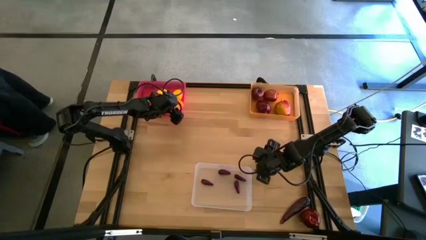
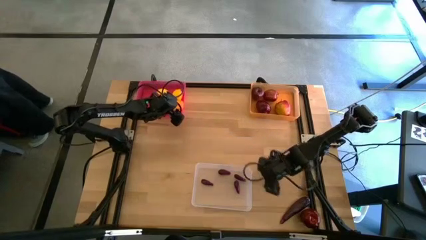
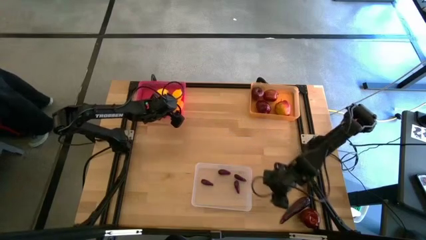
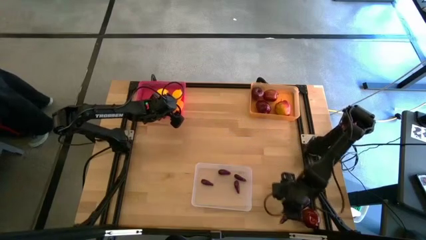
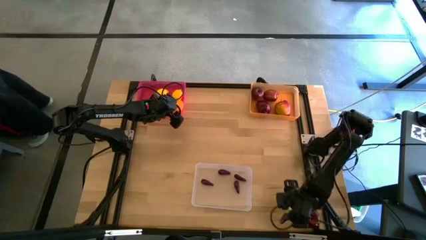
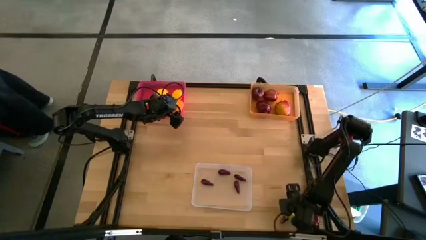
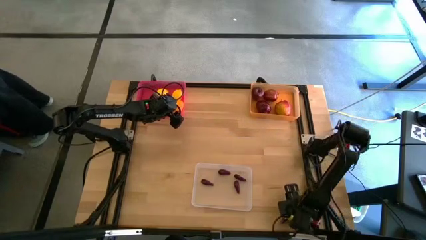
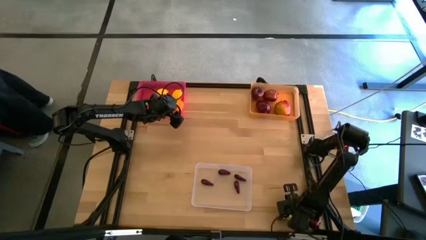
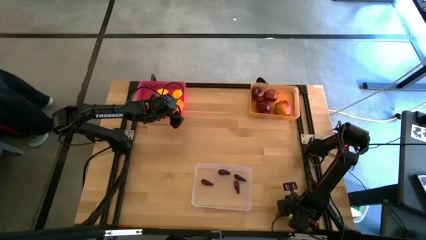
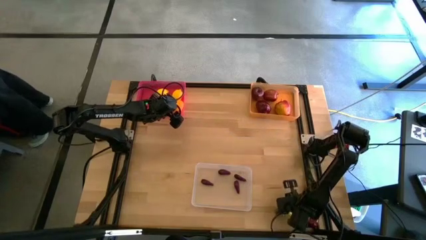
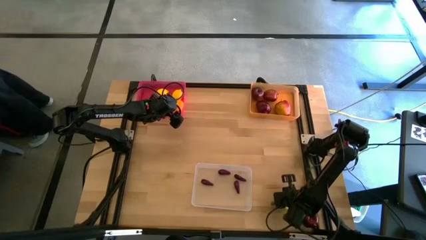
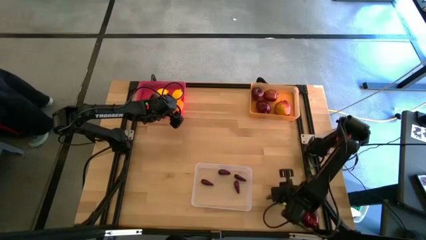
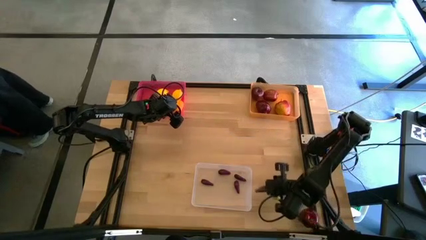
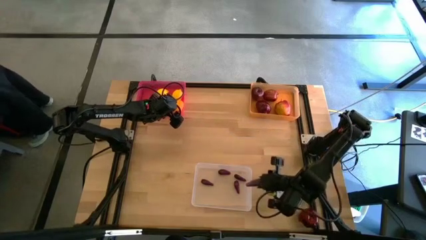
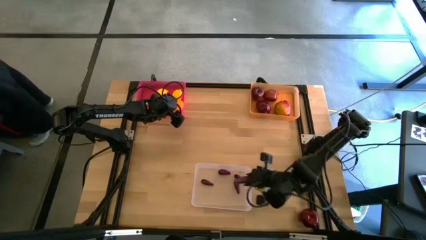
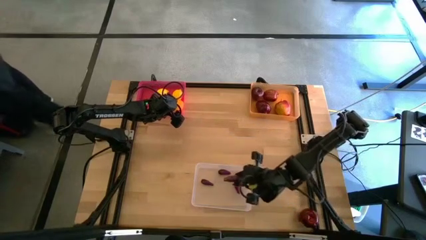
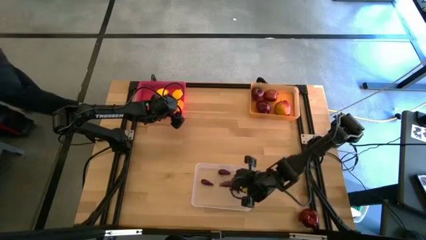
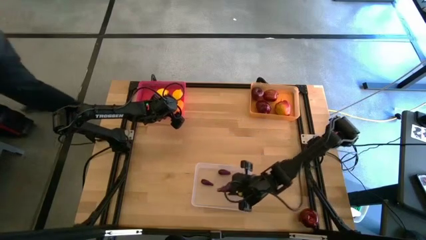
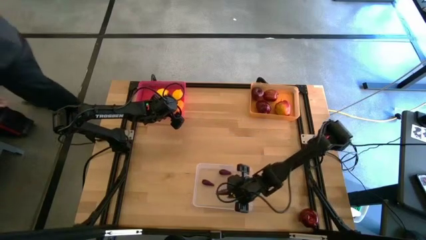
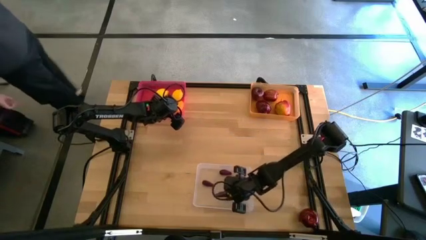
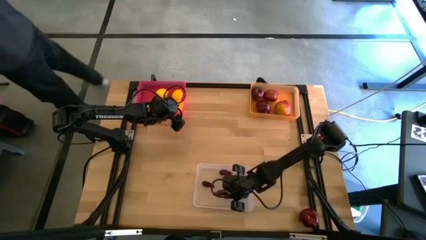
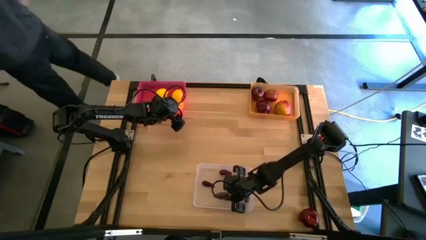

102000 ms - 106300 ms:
Task: Sort produce into baskets
Put the eggplant into the transparent bin

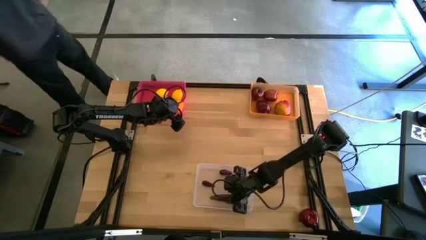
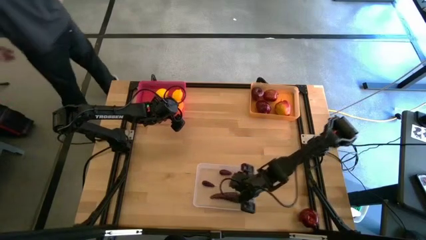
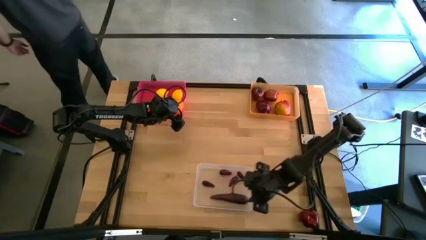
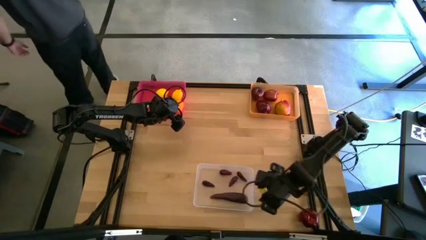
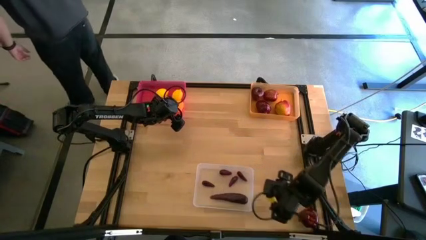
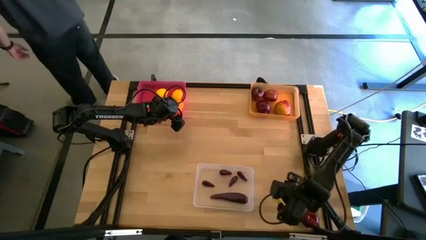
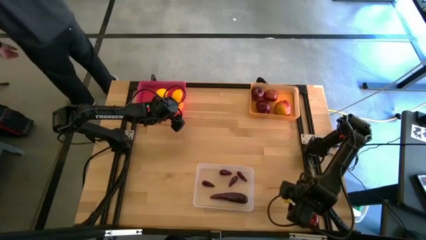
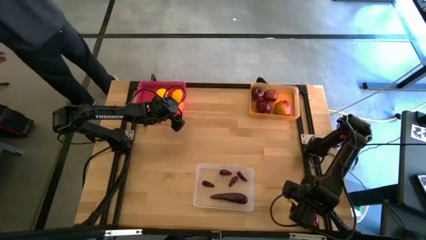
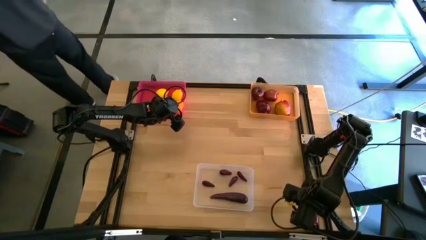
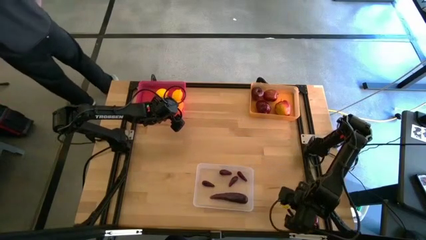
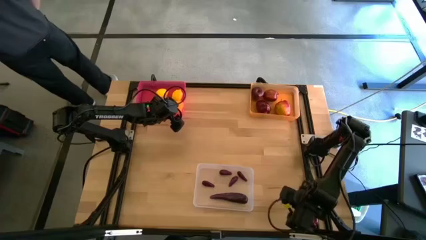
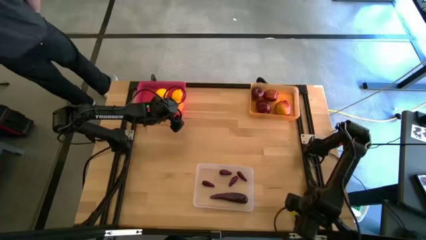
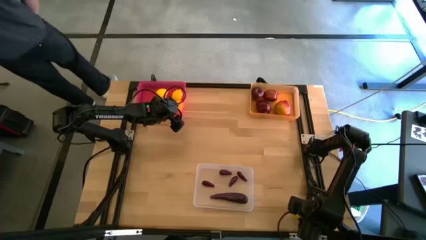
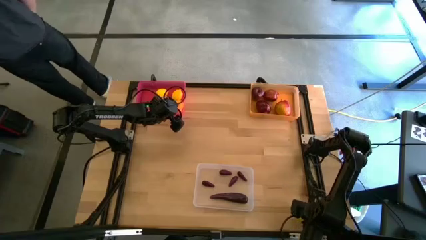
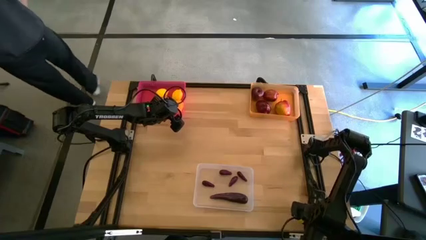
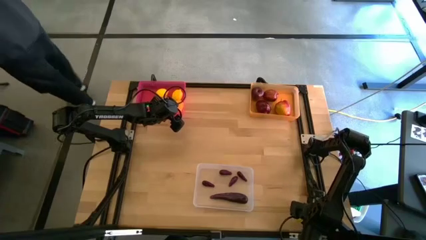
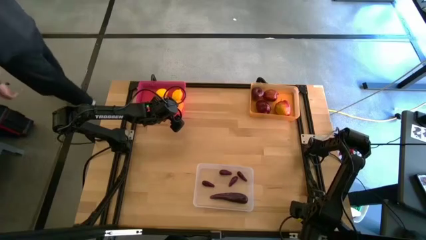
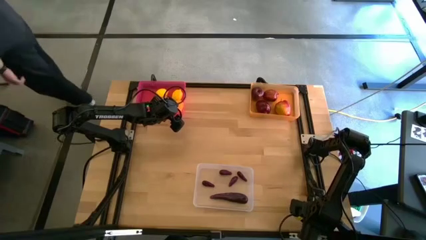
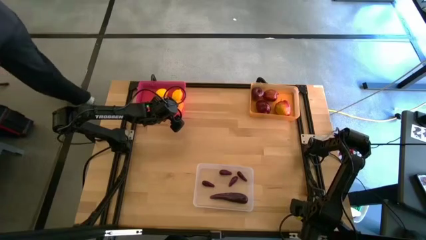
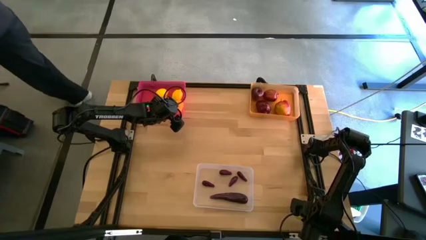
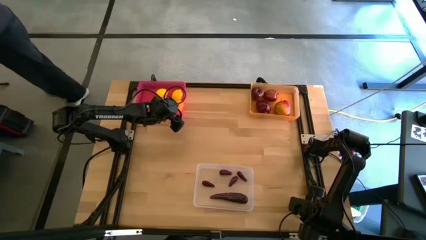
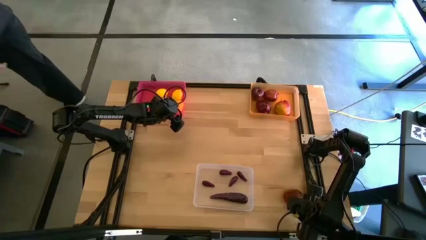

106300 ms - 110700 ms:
Put the apple into the orange bin

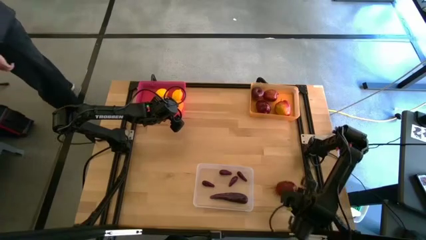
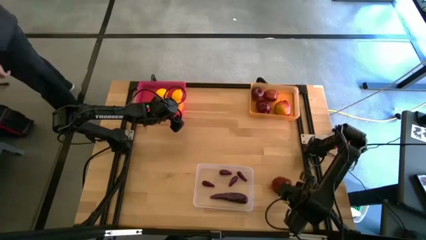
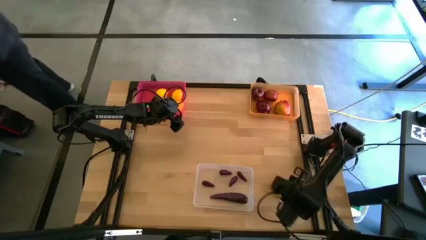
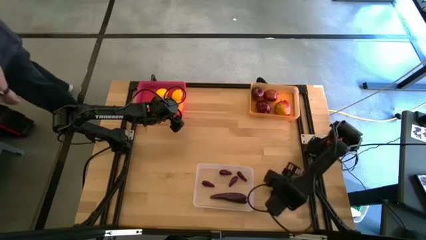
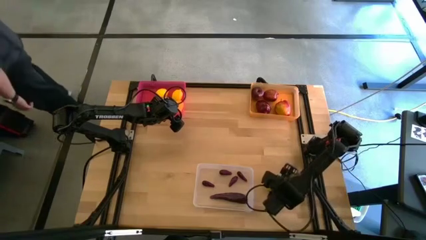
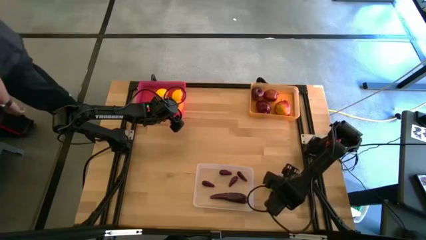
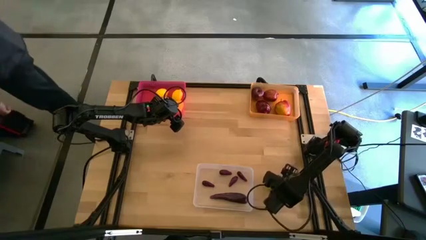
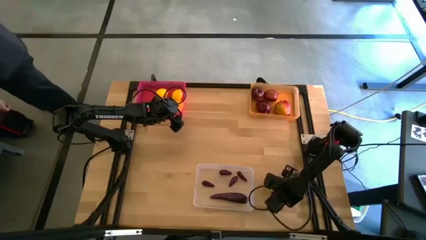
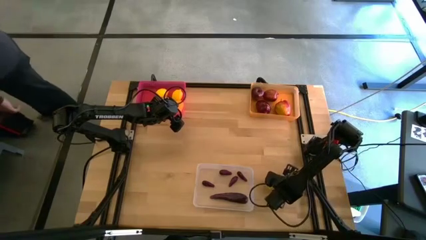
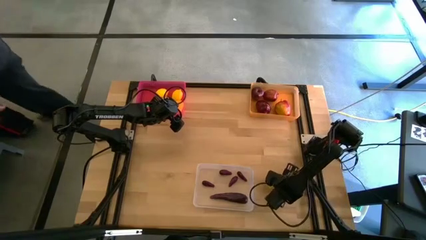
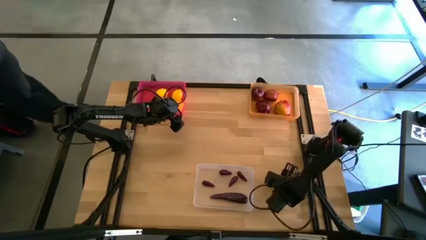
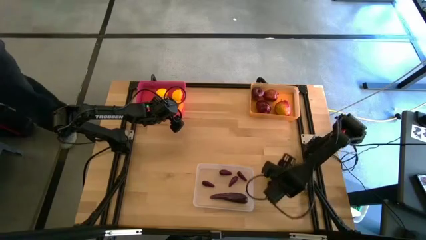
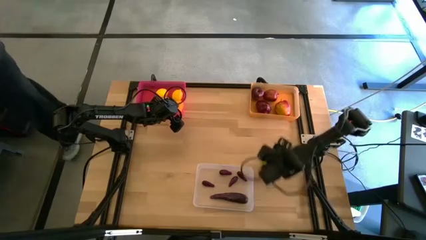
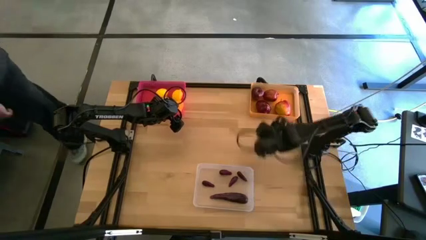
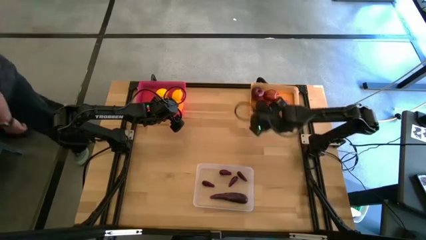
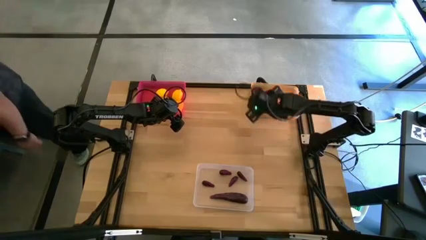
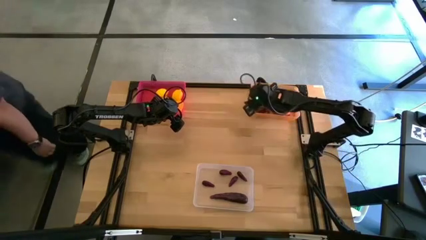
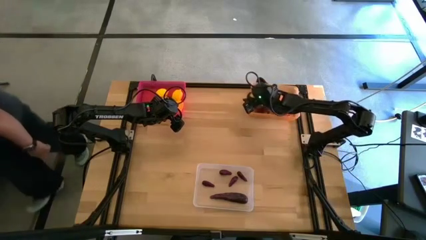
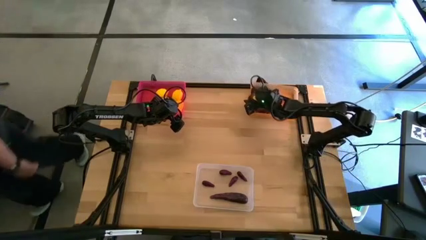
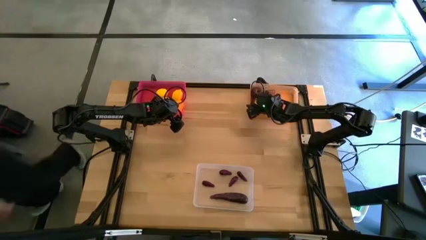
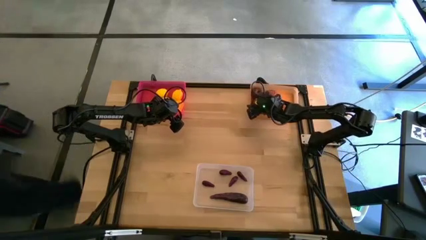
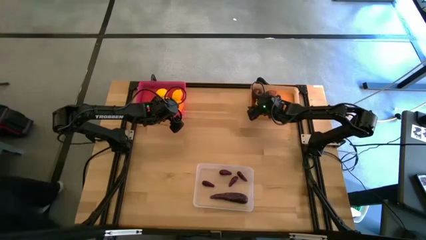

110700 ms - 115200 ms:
Put the apple into the orange bin

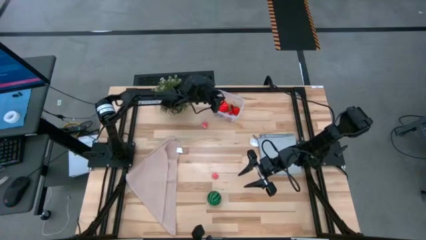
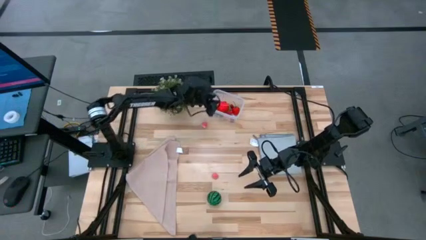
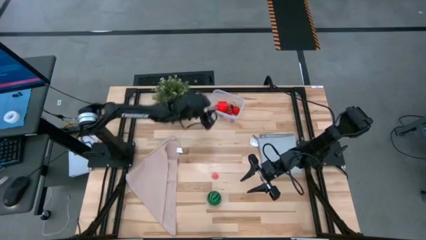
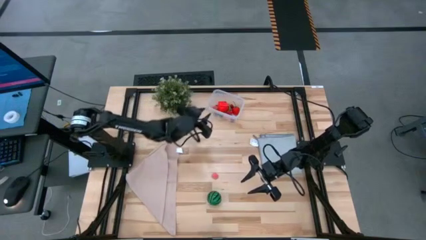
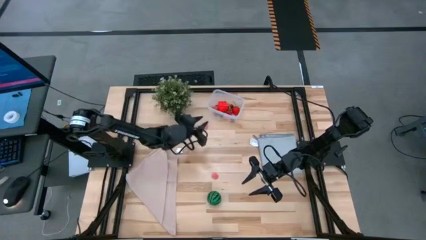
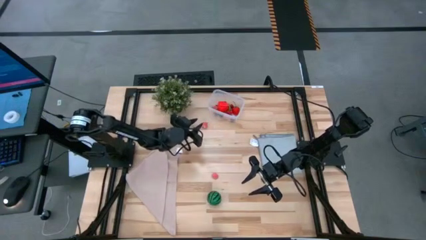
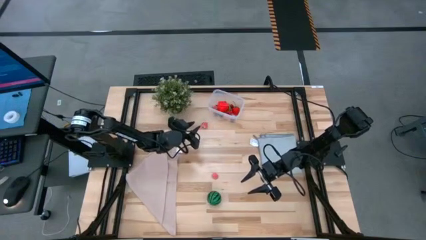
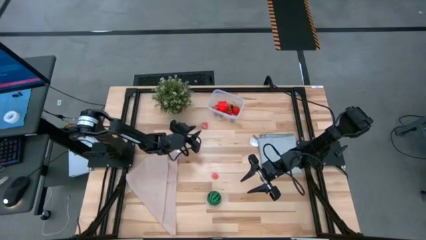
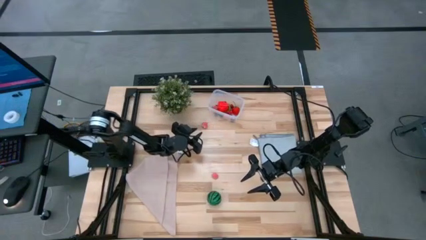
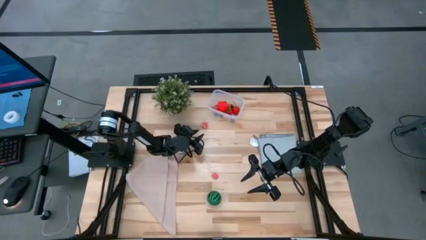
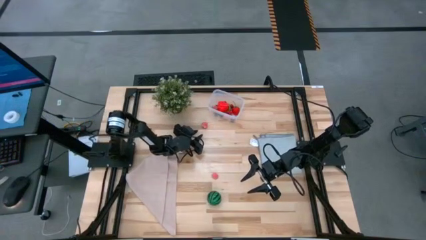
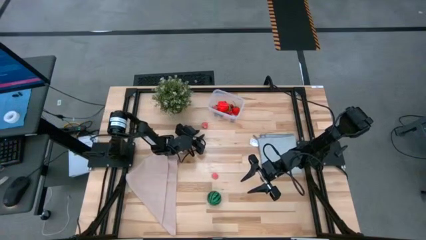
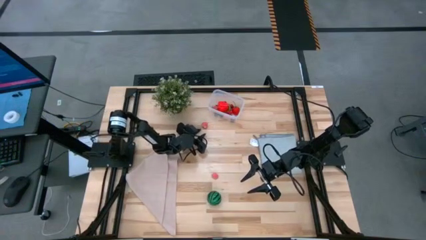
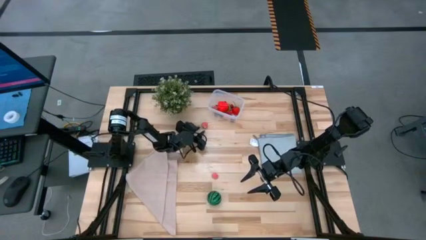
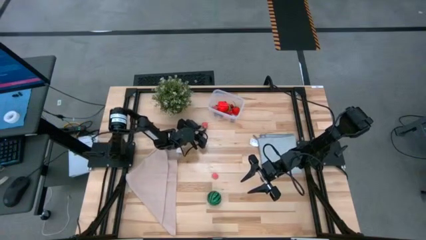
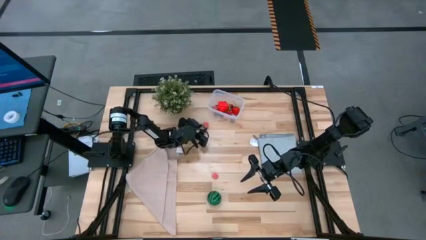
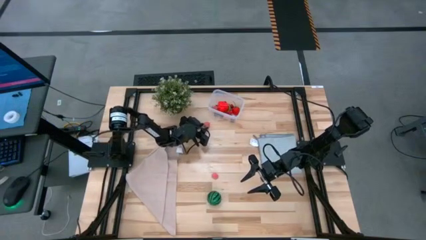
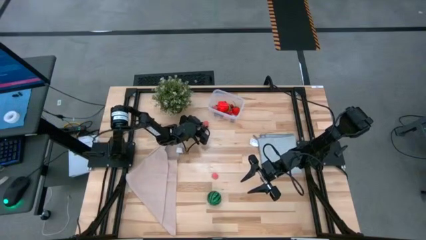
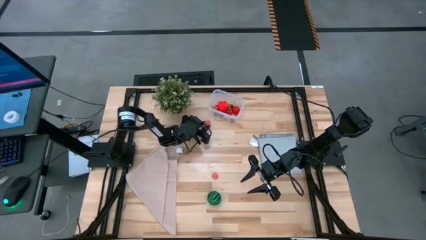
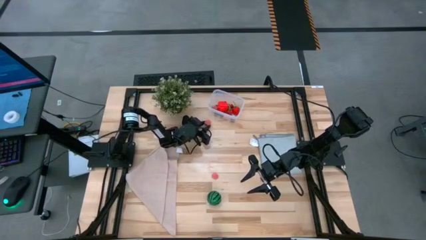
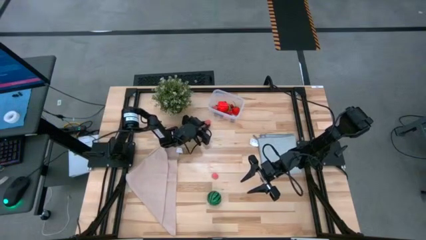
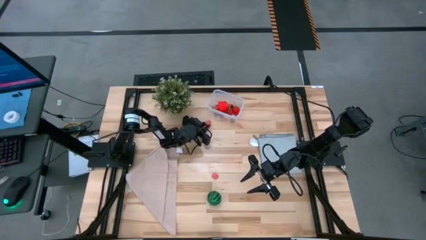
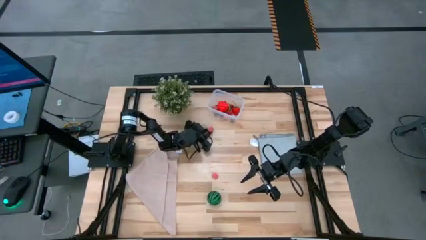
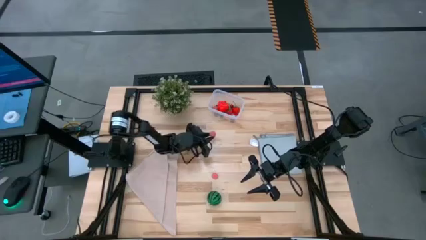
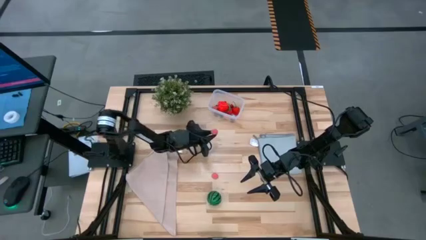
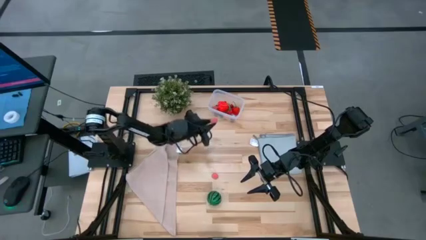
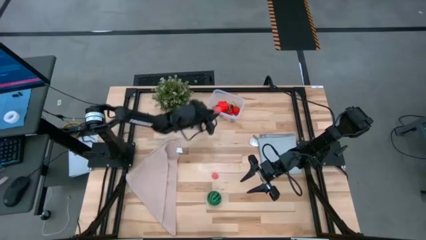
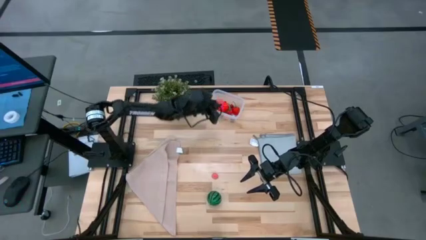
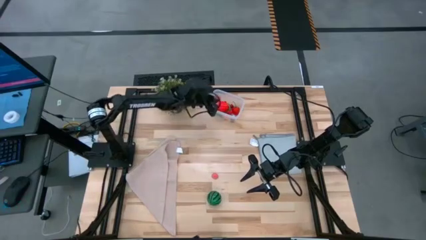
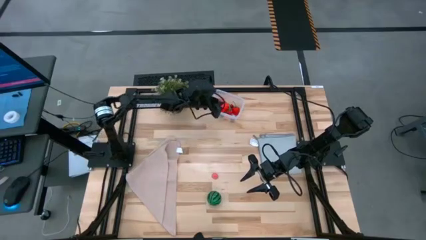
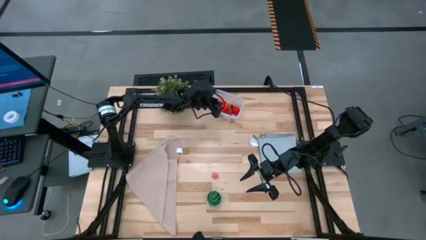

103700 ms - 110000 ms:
Task: Pick and placing Produce into tupperware
Put the peach into the transparent bin
